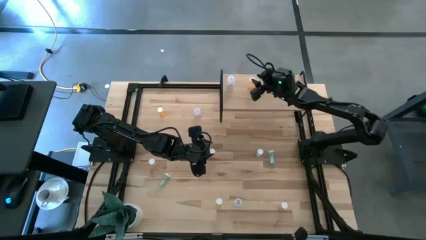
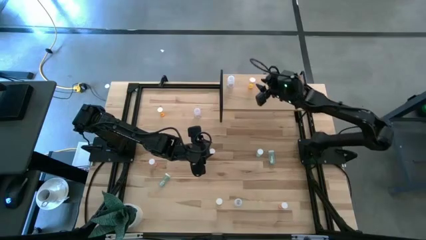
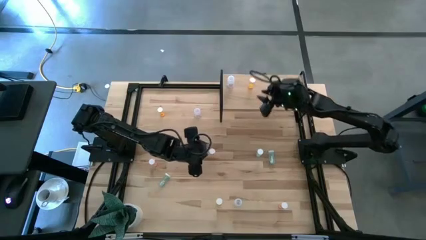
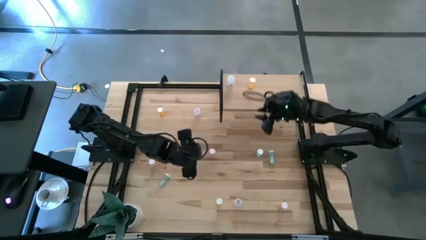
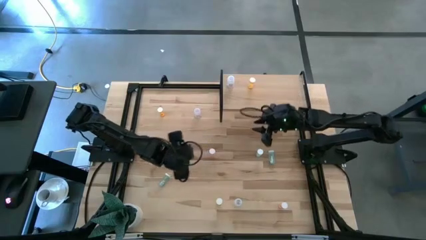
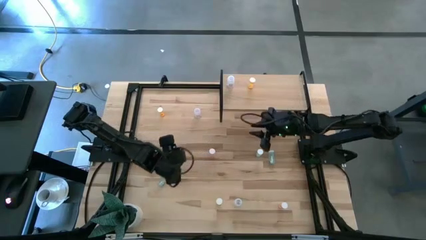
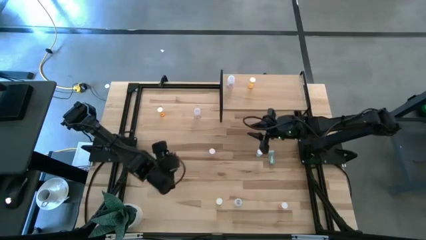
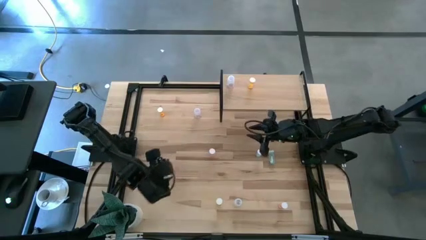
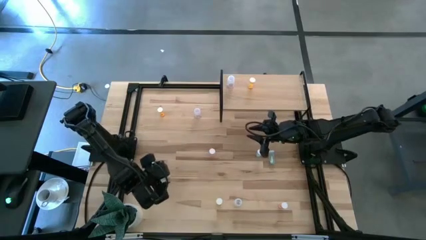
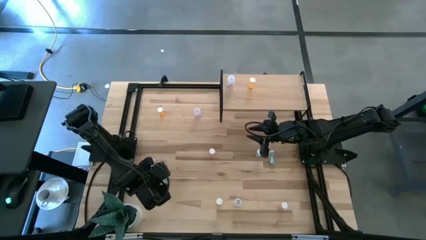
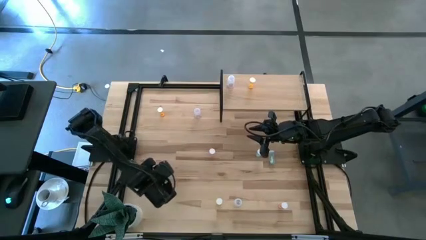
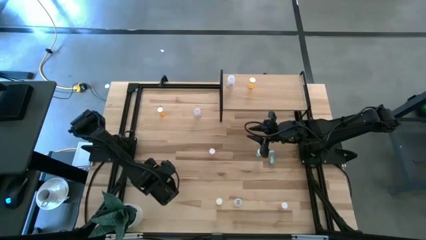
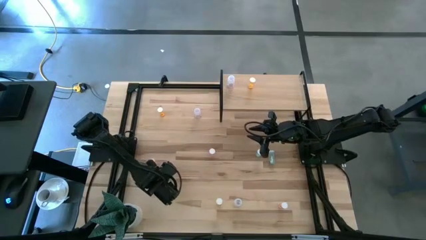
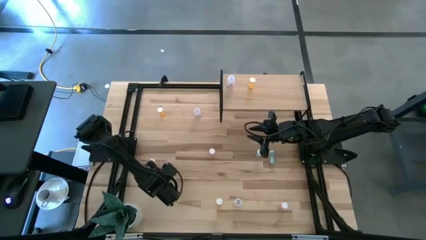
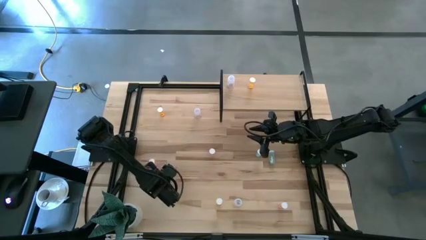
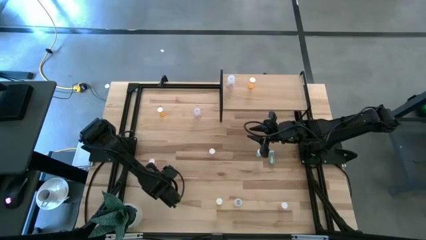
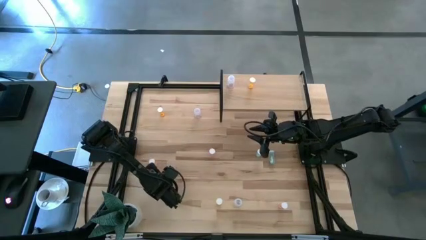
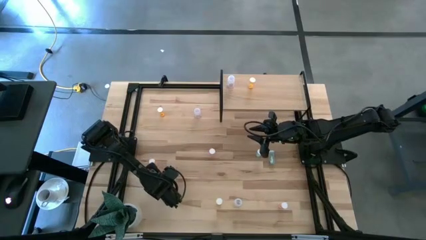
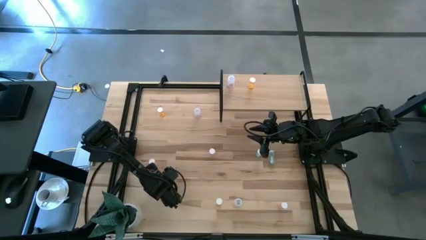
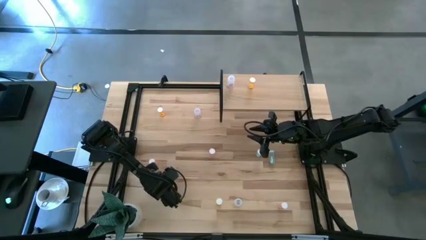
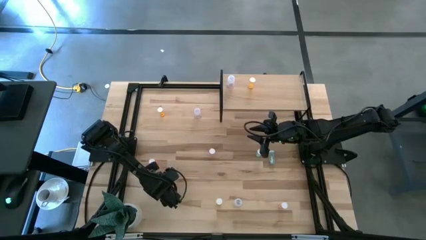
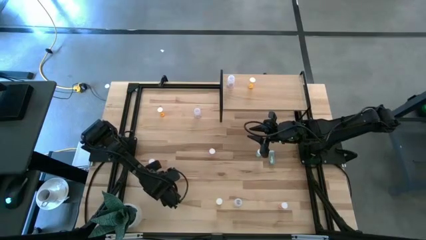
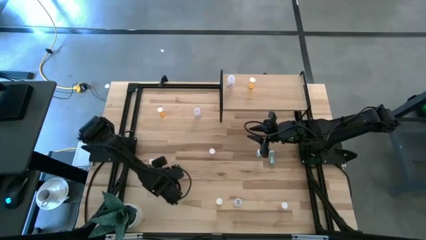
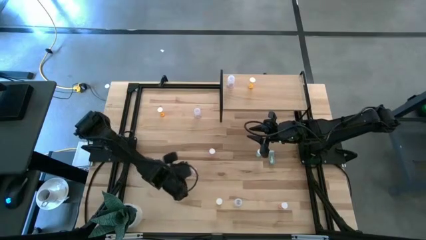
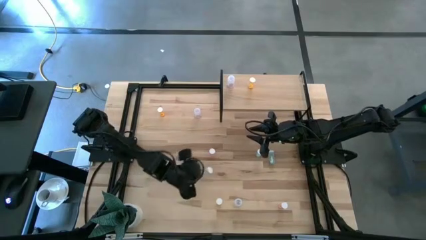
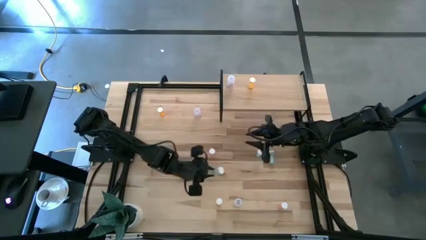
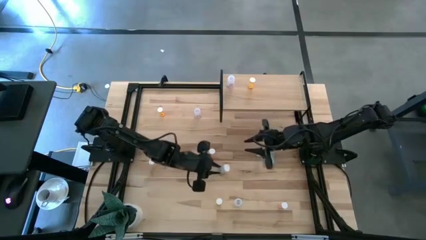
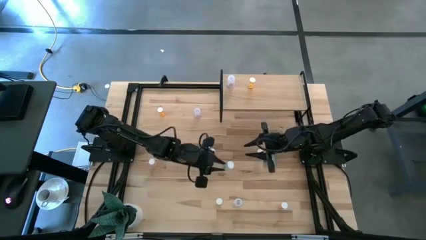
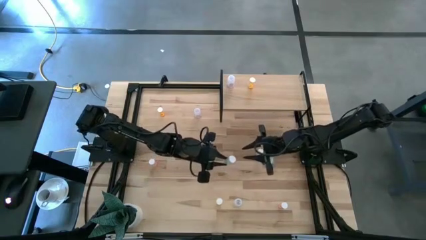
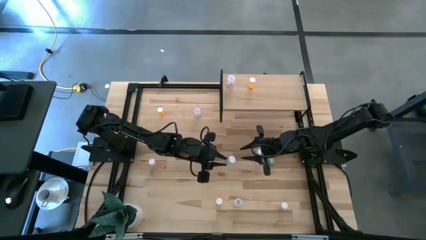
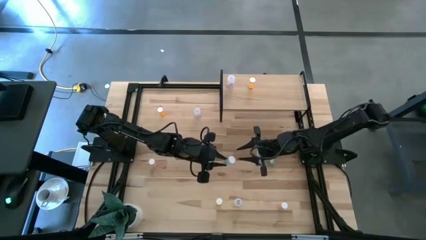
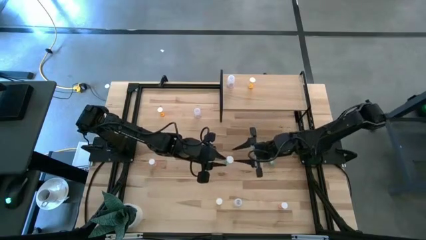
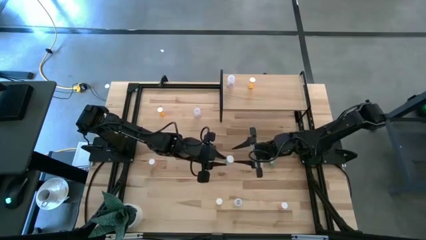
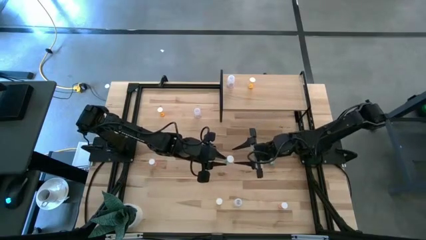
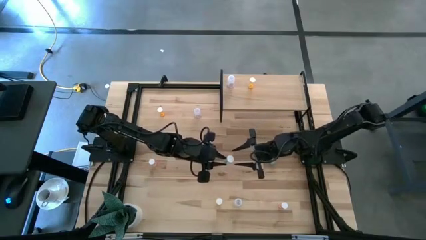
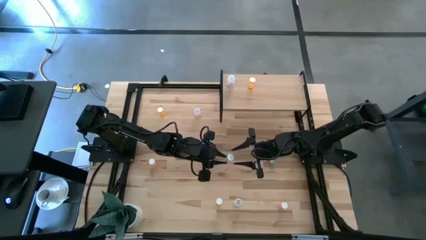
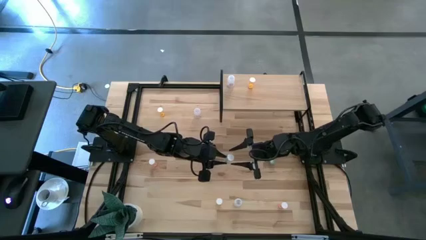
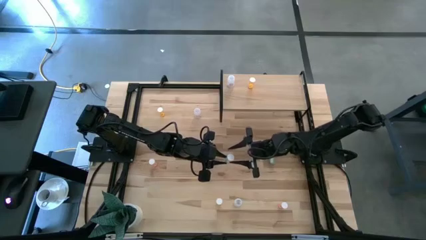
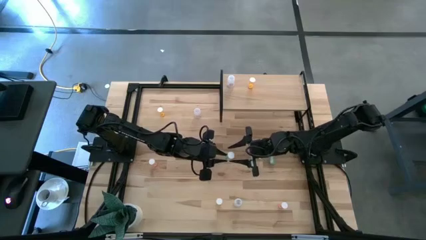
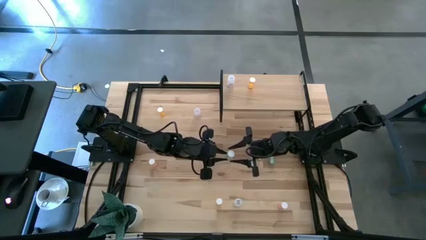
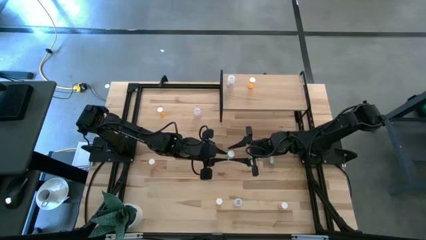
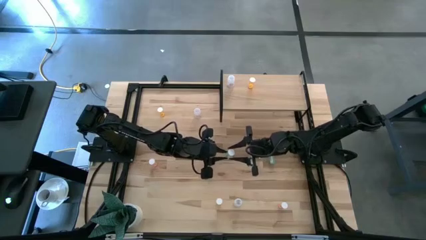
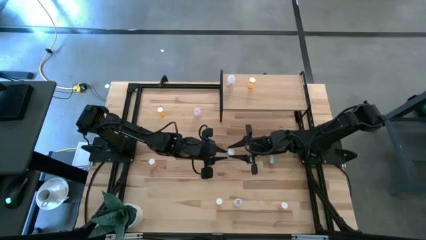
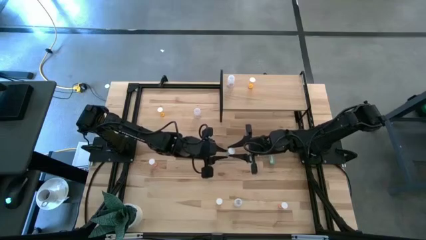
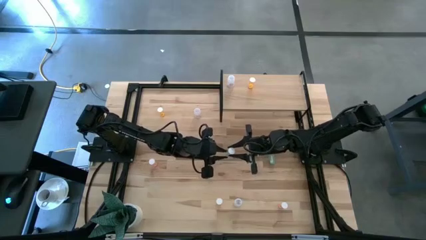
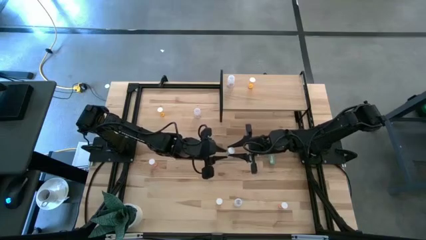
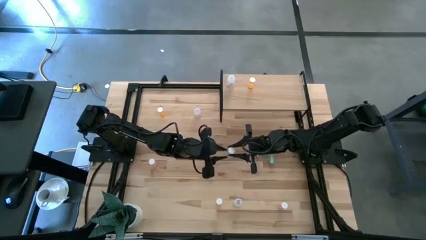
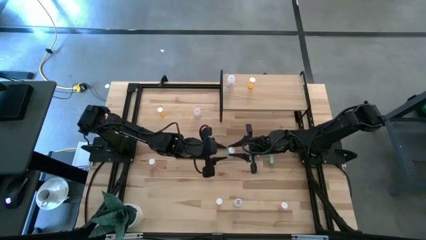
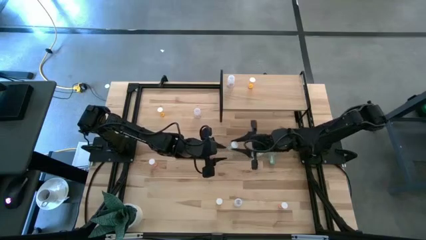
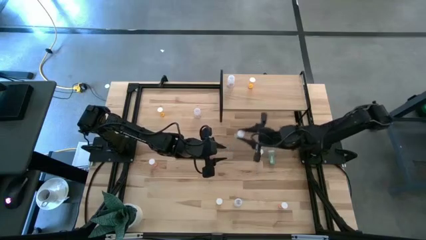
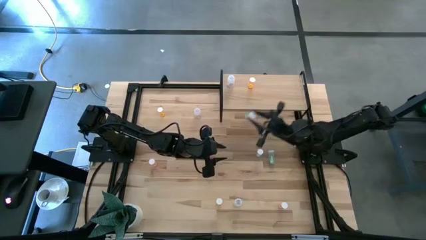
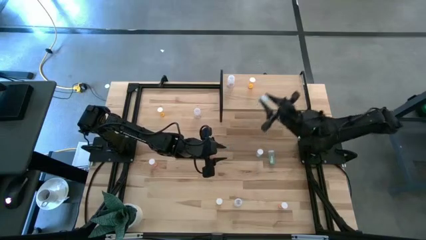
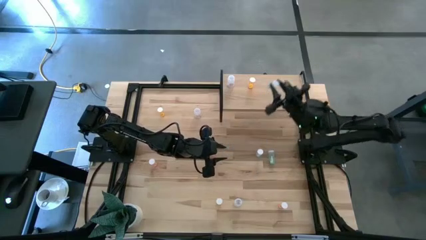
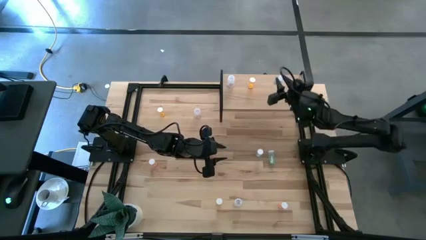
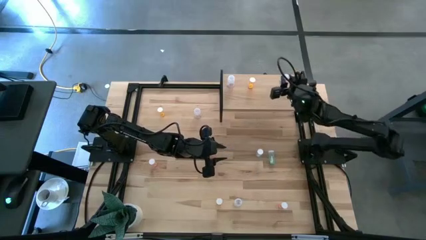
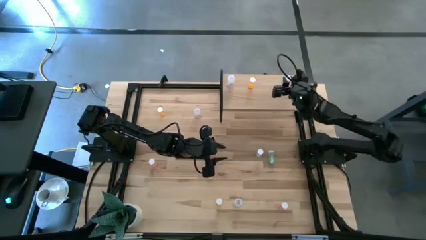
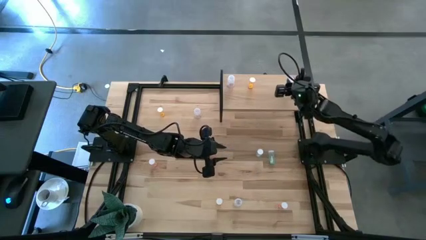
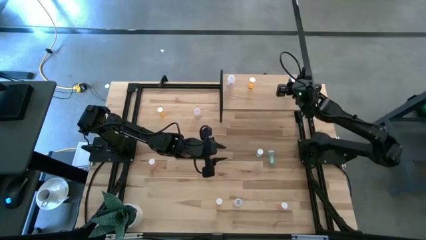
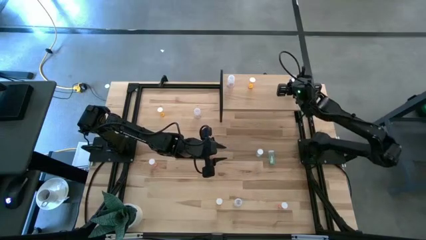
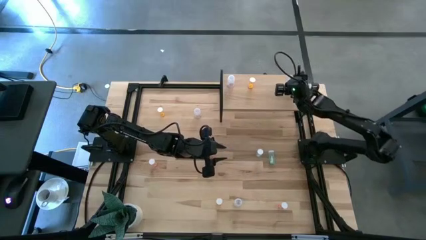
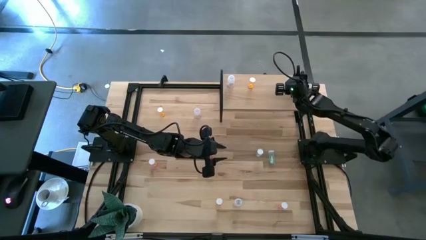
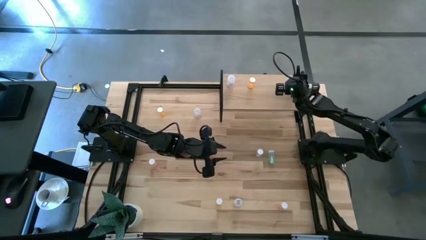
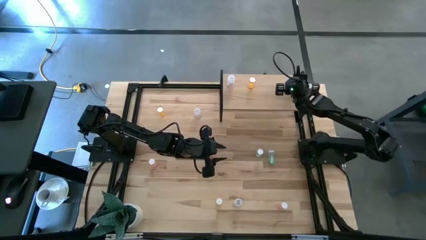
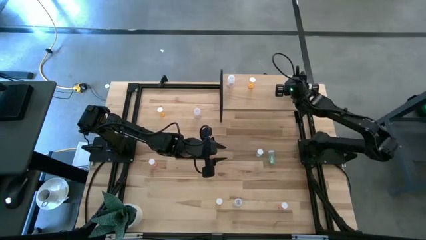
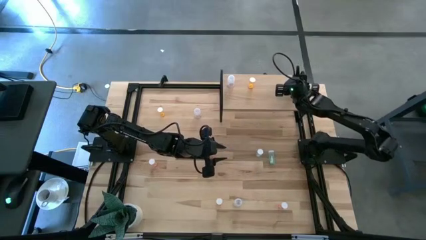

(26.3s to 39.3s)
Task: Pick and place medicine bottles onto shelf by color
Put the bottom left blue pill bottle on the shelf
